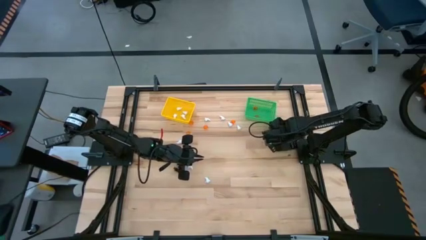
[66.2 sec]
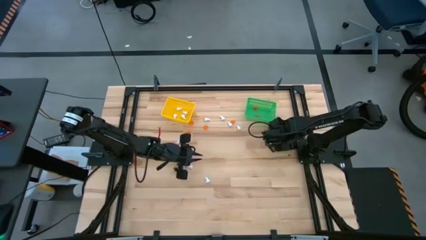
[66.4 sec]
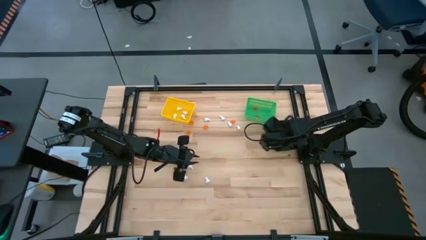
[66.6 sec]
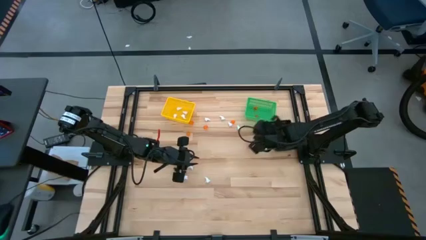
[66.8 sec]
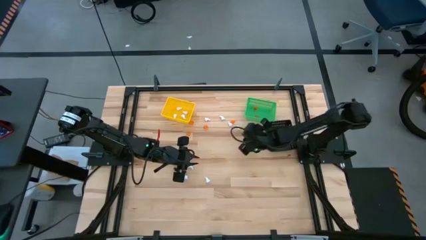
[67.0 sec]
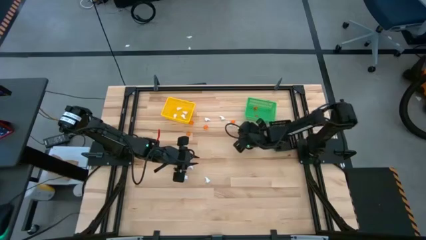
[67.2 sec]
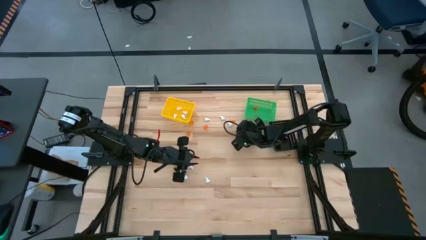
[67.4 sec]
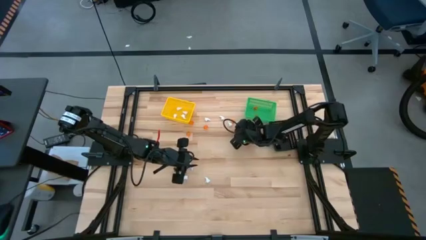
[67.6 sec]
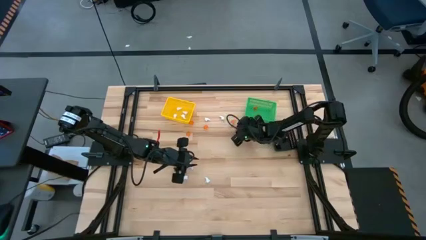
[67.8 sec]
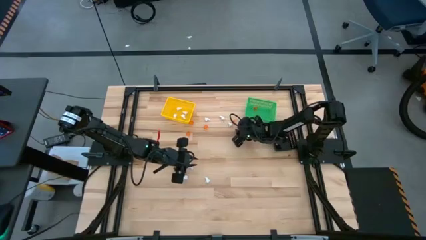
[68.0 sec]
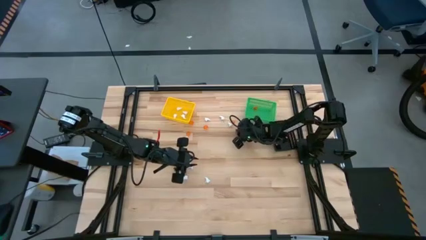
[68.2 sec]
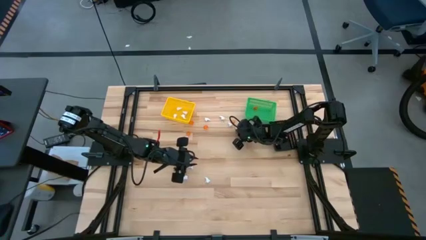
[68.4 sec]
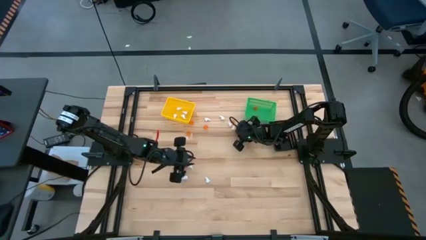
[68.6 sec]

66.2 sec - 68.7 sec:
Task: Sort Halloween decoration
Put the white ghost toy into the yellow bin

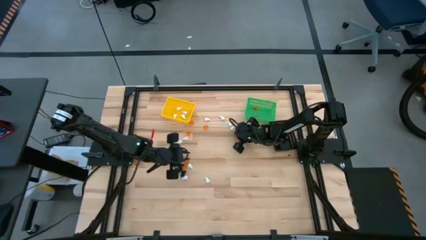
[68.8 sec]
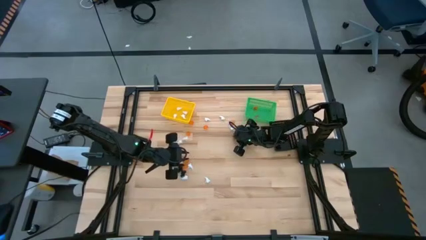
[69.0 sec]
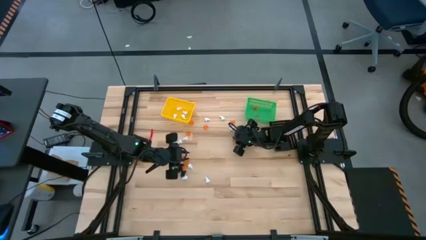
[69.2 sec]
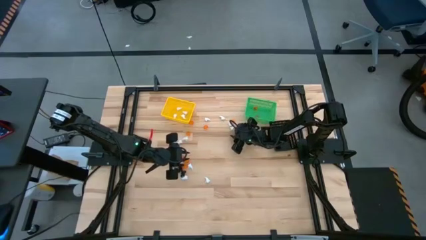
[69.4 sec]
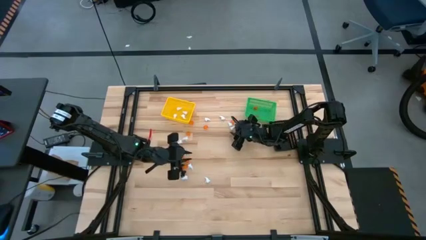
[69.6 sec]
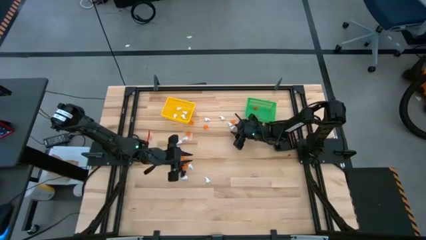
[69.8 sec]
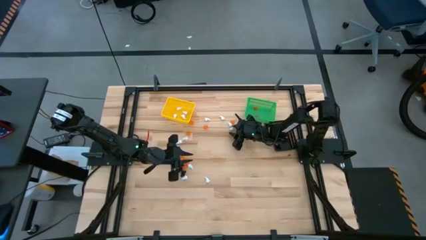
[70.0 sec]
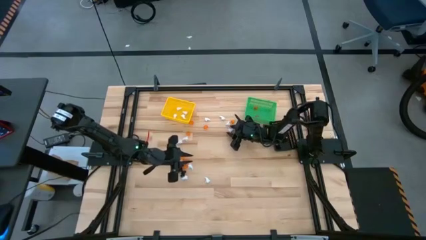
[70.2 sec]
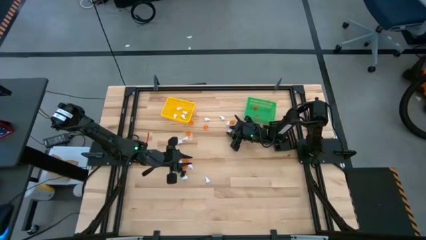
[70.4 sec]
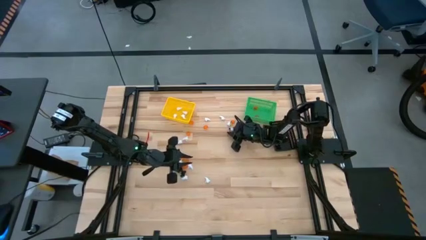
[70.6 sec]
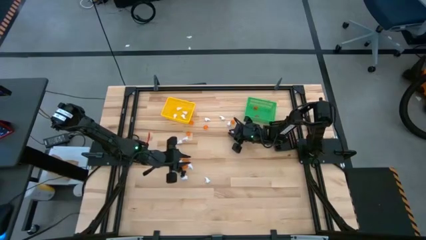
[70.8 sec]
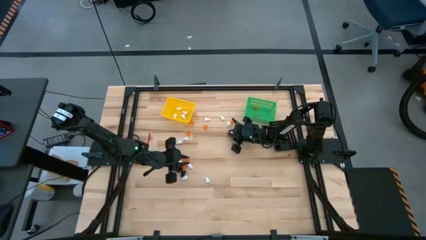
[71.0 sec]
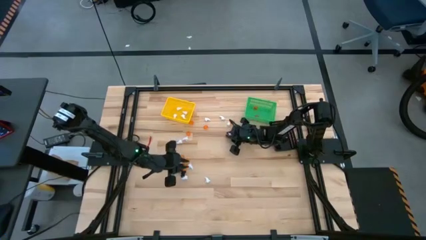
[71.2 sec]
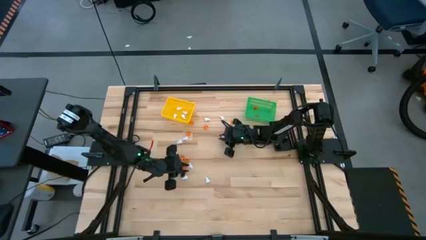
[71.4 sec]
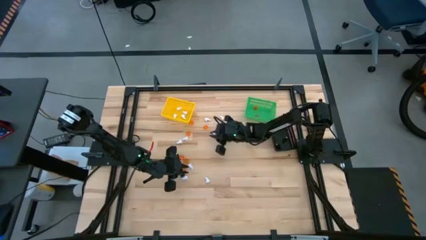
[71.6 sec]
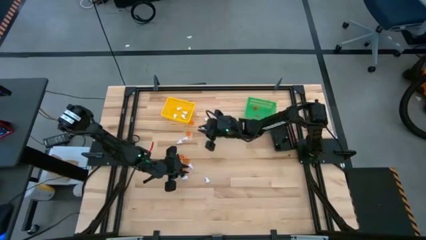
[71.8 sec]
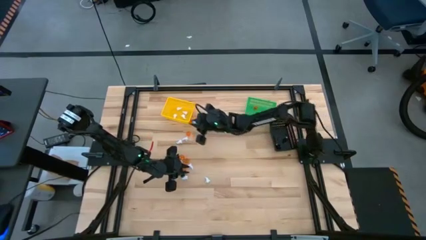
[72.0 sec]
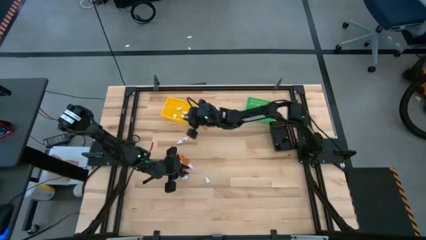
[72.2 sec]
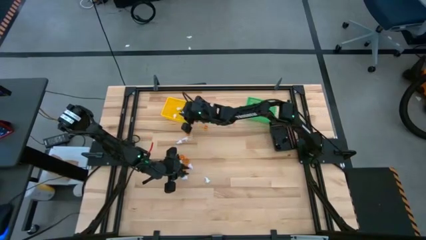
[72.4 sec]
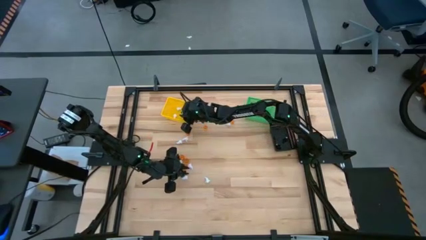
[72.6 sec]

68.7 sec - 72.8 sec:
Put the white ghost toy into the yellow bin

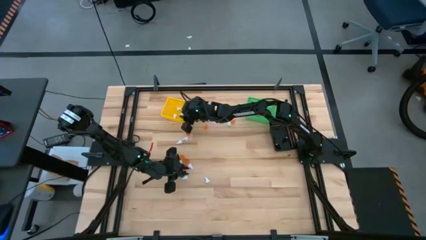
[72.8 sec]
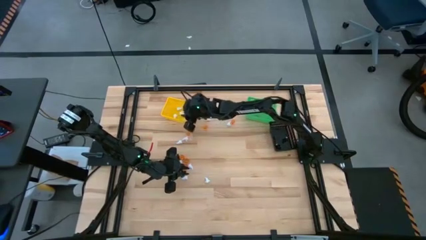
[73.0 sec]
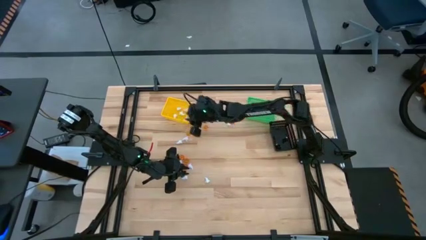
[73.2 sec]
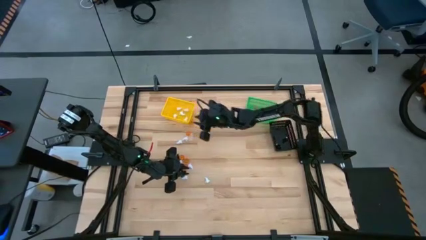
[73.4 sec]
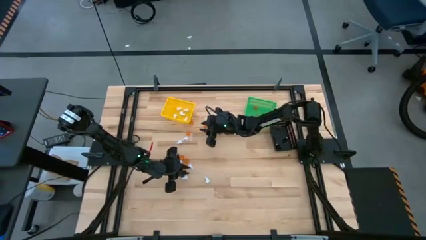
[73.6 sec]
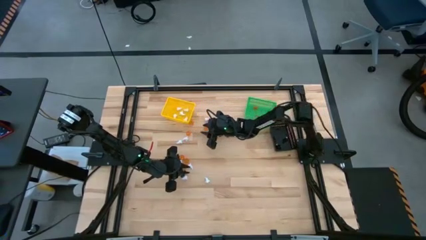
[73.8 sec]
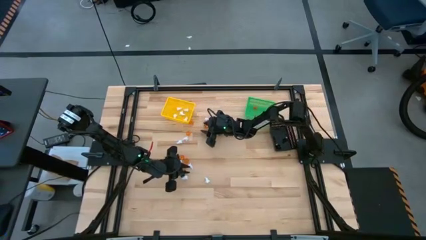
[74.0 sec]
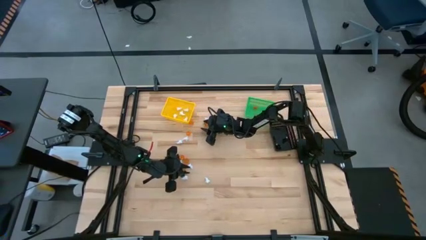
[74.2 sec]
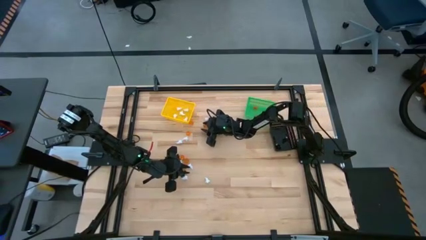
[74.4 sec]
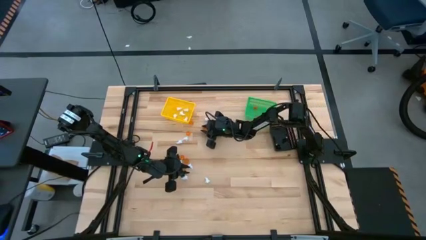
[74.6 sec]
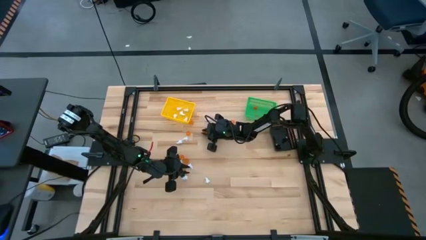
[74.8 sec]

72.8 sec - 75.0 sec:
Put the orange pumpkin toy into the green bin

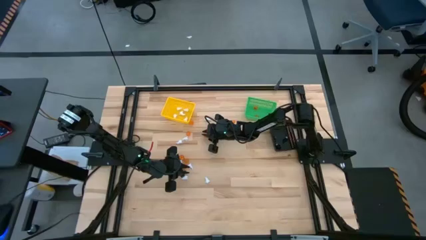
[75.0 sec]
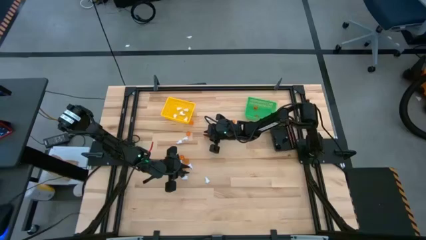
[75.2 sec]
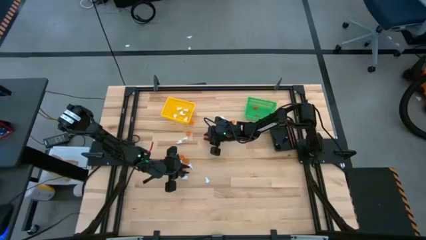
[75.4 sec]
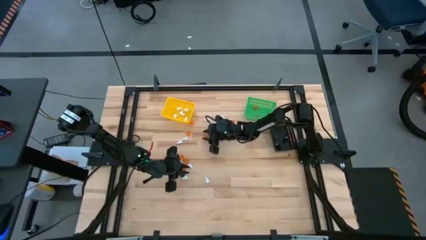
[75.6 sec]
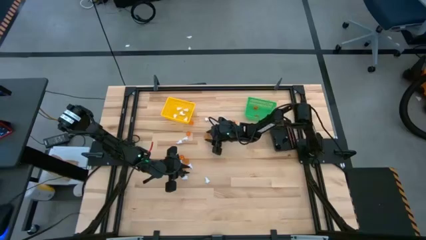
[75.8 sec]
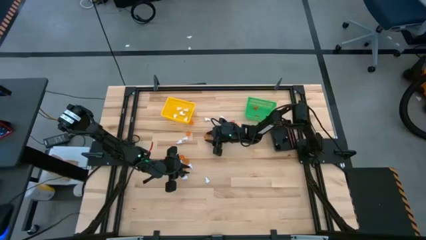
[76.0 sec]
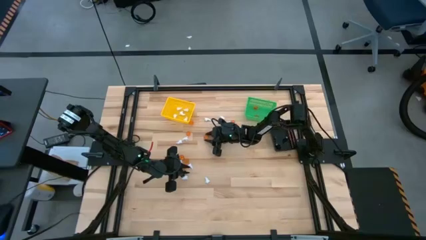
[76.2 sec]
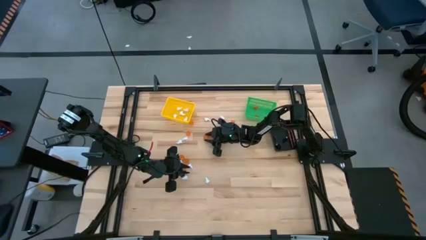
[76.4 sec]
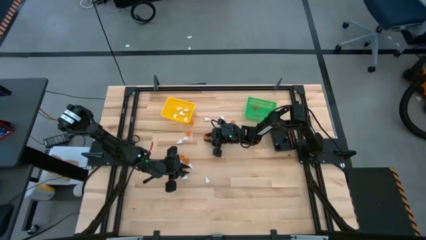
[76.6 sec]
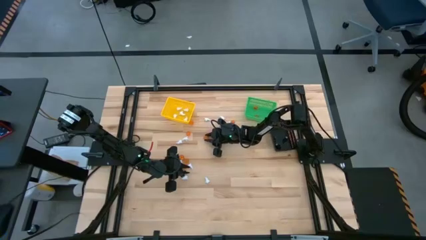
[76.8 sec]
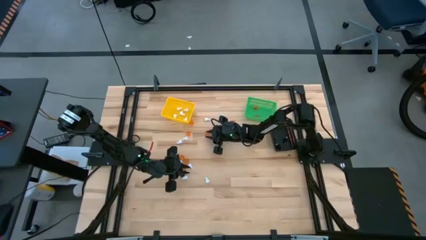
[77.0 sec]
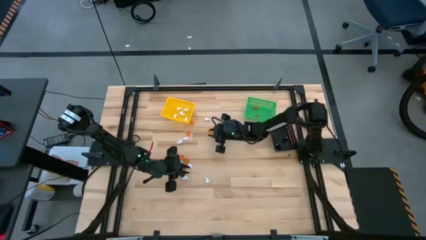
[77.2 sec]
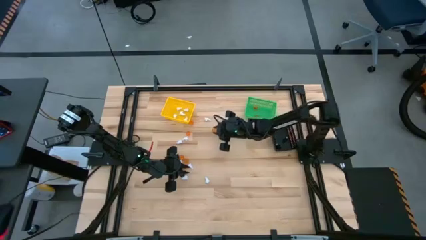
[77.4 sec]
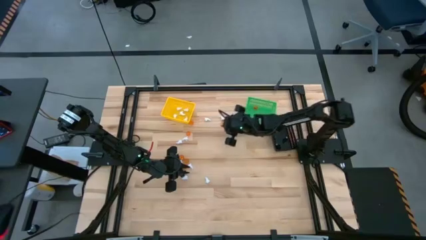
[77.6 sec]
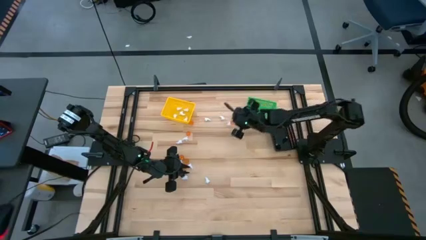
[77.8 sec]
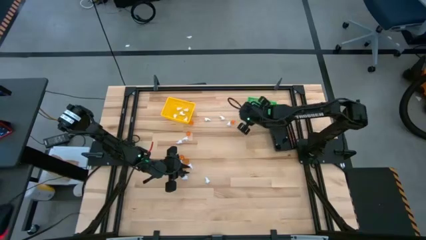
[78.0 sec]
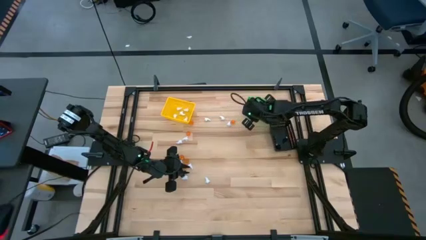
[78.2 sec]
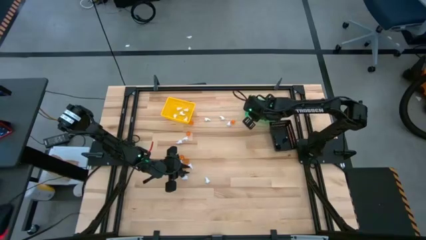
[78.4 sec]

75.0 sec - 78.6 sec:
Put the orange pumpkin toy into the green bin

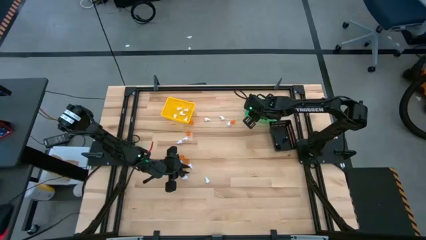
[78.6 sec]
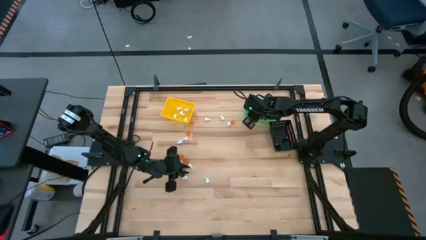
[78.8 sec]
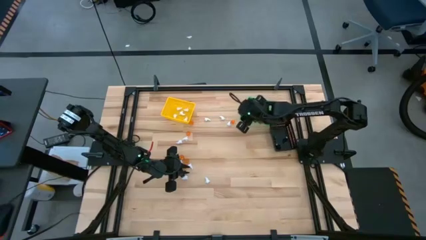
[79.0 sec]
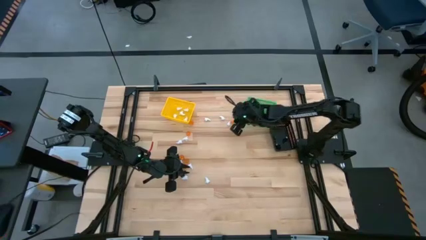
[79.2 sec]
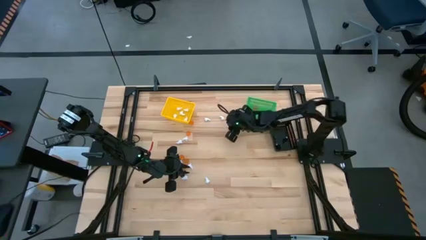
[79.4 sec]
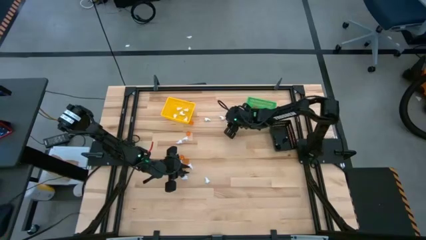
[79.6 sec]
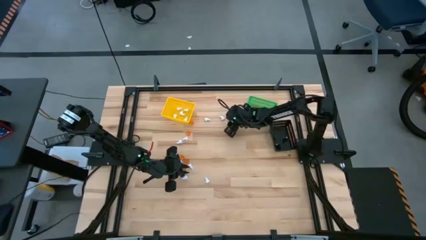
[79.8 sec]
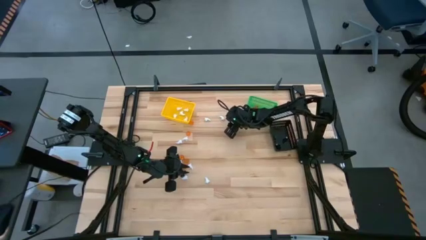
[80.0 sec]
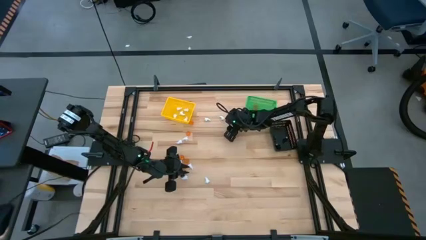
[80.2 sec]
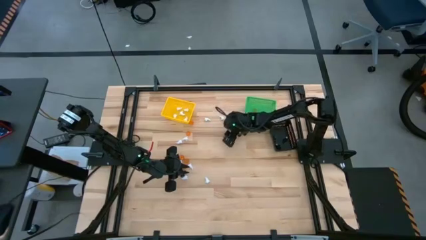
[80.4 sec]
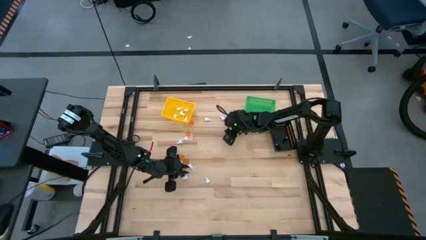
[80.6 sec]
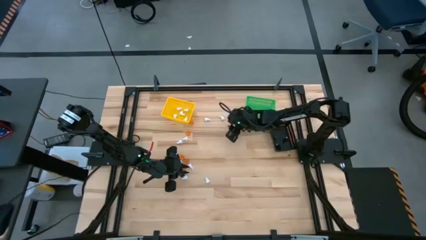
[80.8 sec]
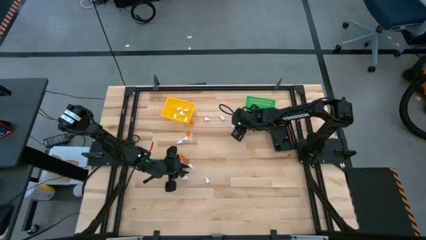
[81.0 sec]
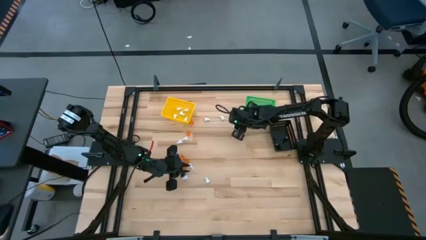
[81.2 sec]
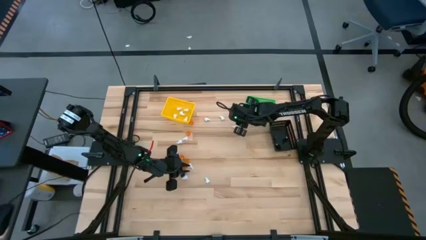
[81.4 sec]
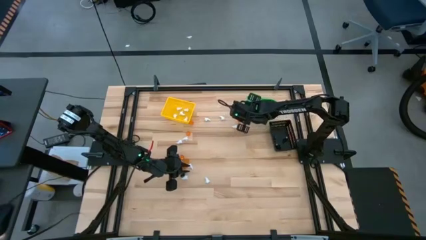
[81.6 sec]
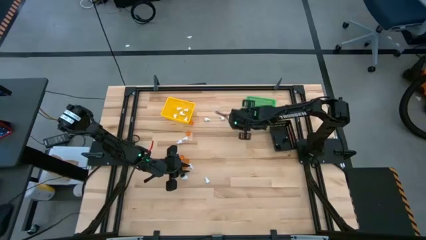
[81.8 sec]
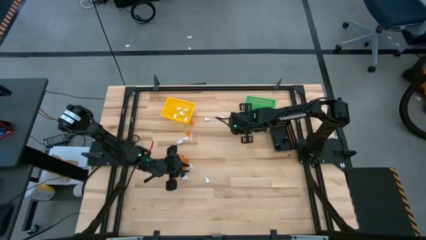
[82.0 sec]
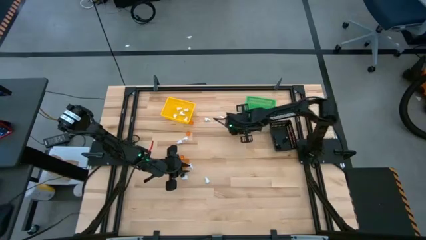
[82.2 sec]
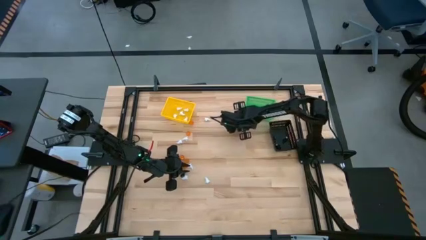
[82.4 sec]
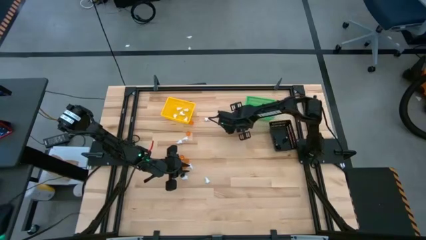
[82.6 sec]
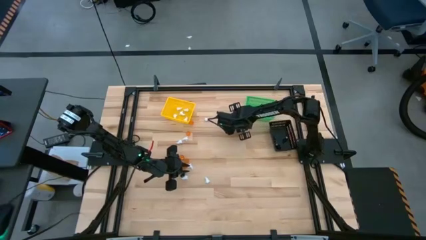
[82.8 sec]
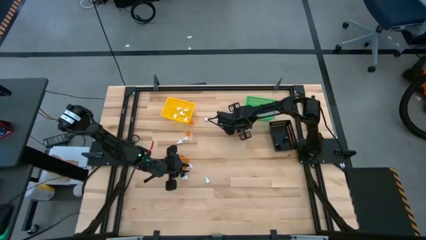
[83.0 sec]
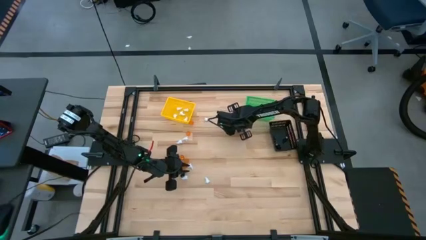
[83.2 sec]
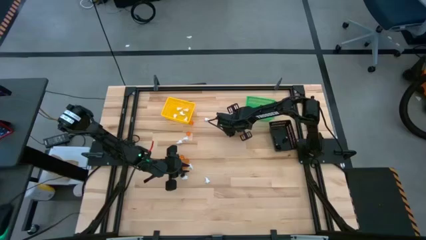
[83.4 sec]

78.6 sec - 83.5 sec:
Put the orange pumpkin toy into the green bin
